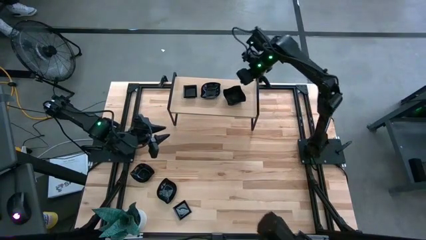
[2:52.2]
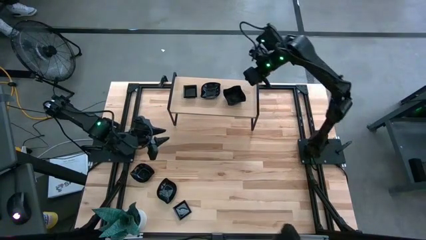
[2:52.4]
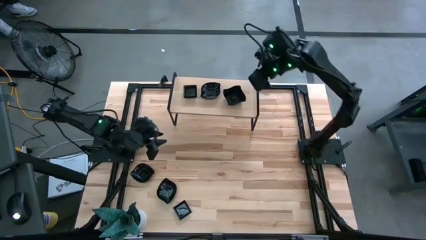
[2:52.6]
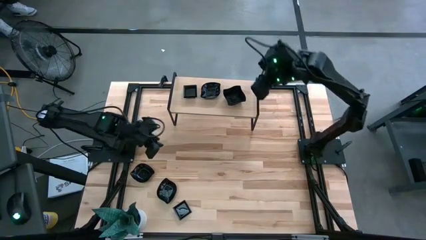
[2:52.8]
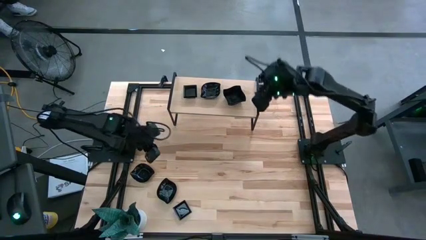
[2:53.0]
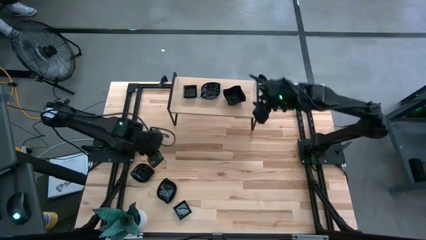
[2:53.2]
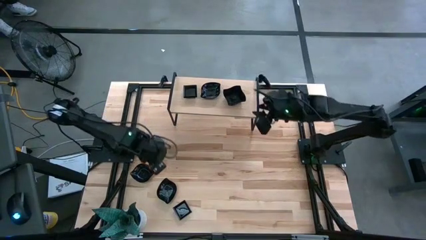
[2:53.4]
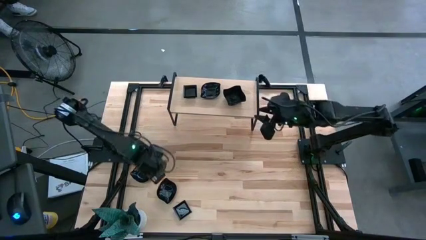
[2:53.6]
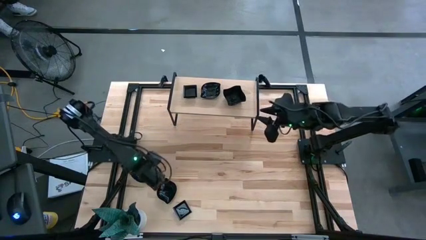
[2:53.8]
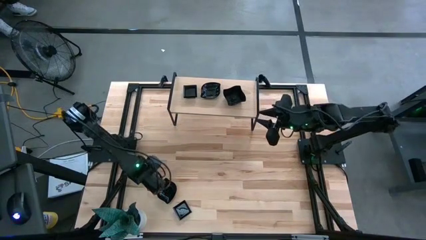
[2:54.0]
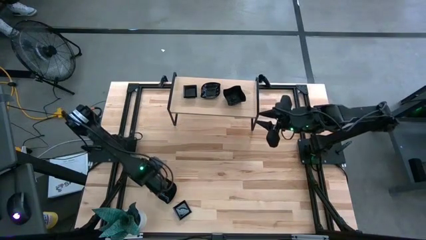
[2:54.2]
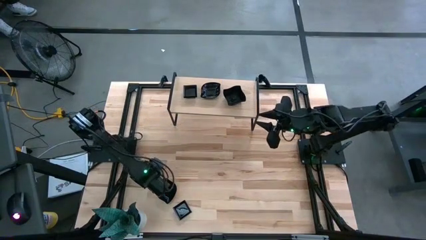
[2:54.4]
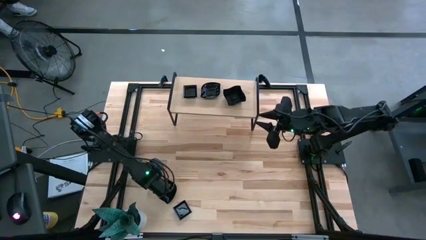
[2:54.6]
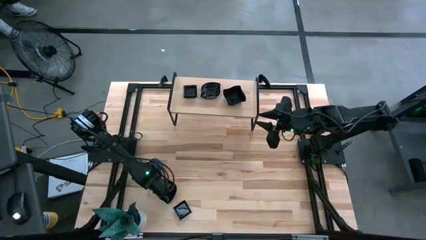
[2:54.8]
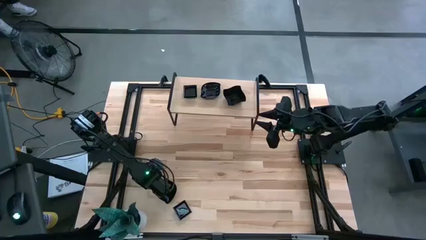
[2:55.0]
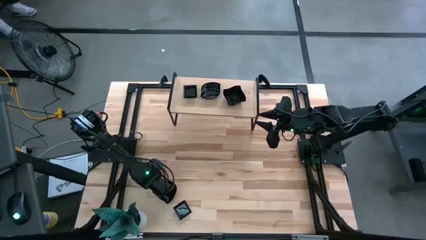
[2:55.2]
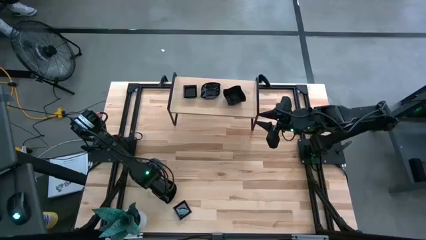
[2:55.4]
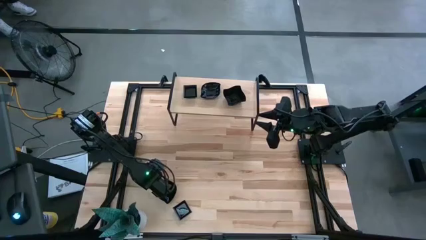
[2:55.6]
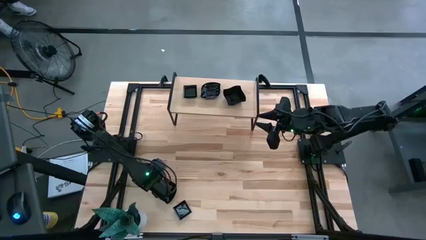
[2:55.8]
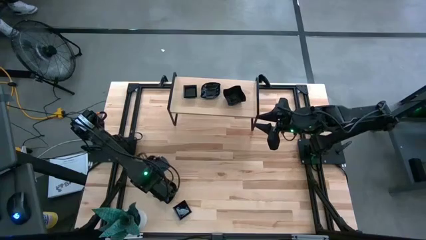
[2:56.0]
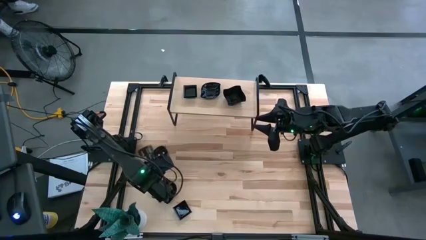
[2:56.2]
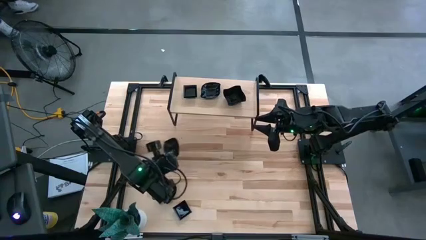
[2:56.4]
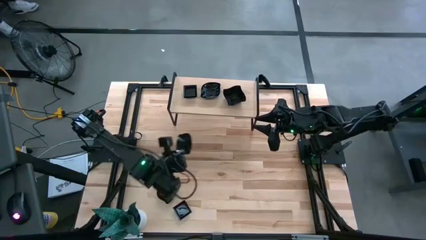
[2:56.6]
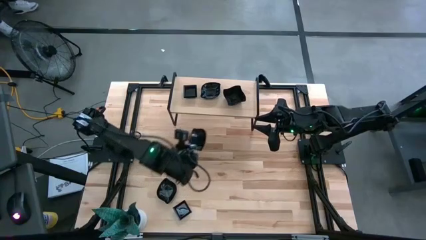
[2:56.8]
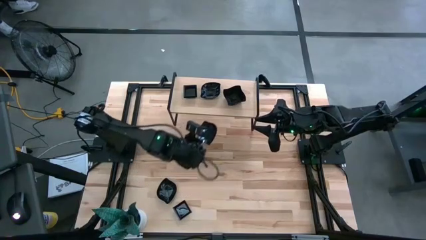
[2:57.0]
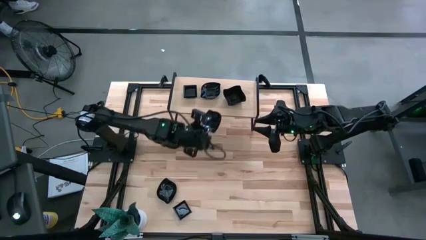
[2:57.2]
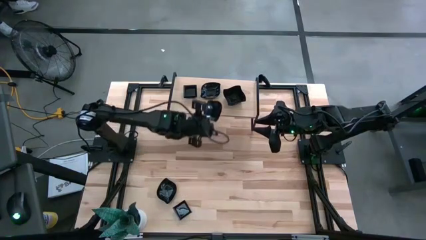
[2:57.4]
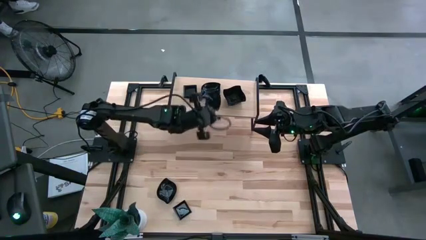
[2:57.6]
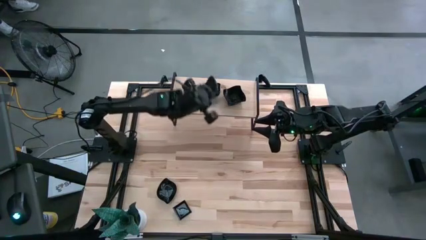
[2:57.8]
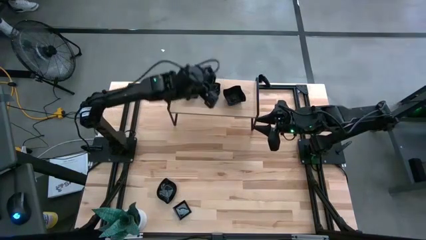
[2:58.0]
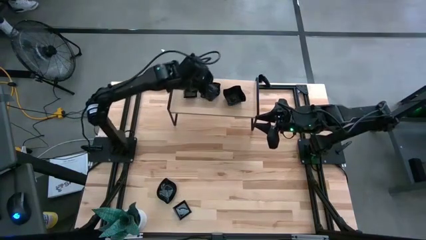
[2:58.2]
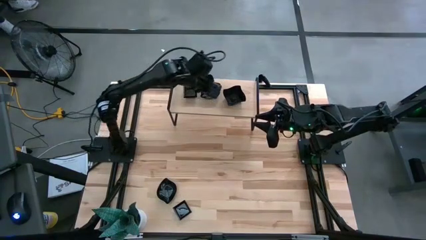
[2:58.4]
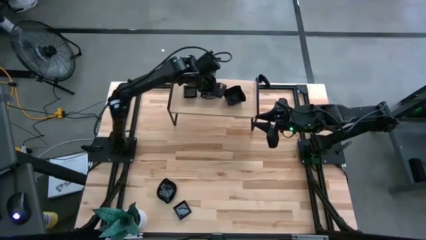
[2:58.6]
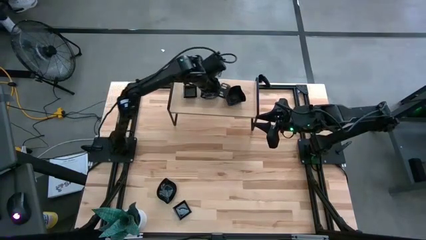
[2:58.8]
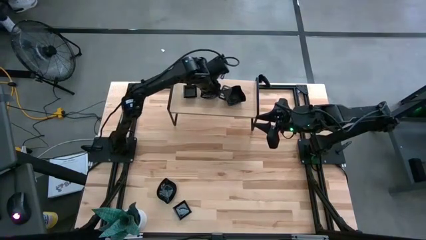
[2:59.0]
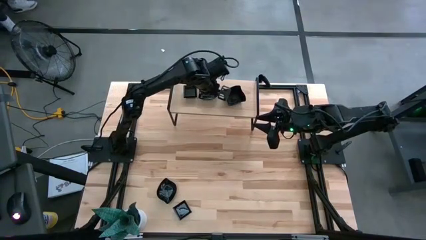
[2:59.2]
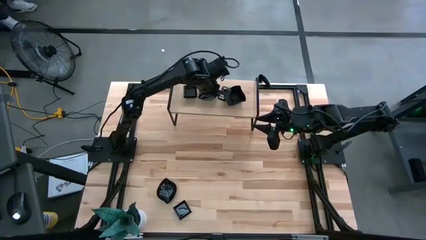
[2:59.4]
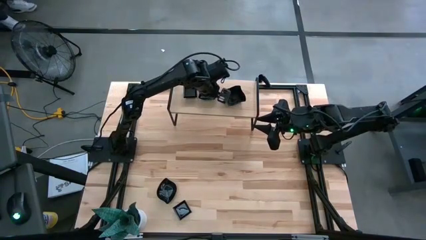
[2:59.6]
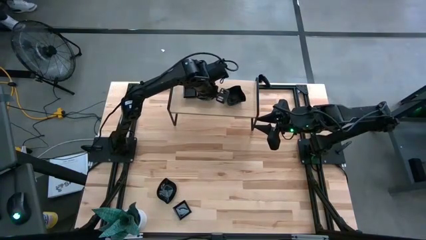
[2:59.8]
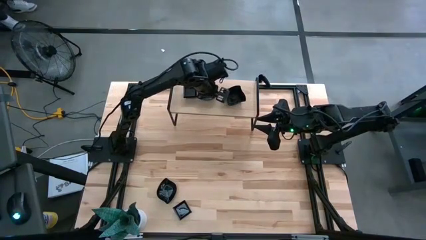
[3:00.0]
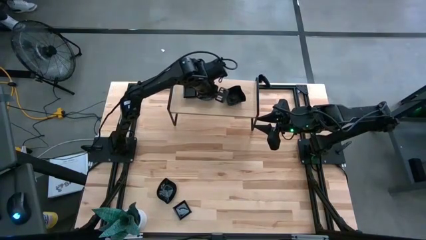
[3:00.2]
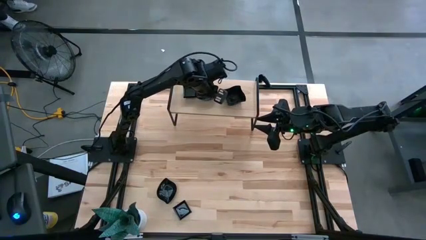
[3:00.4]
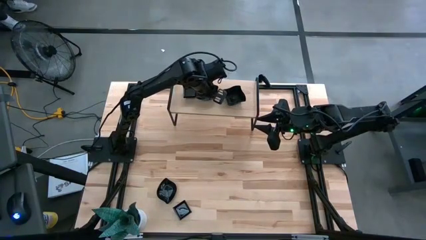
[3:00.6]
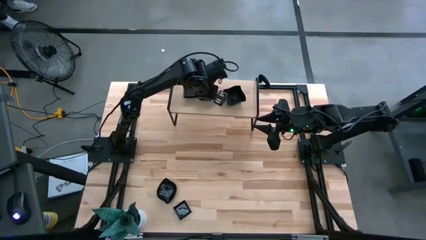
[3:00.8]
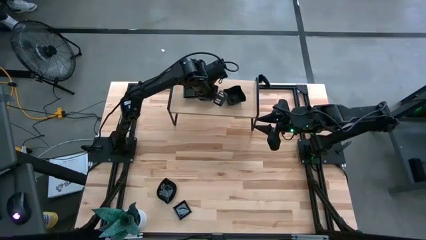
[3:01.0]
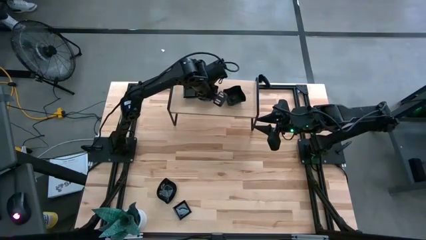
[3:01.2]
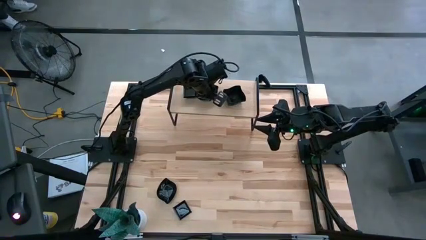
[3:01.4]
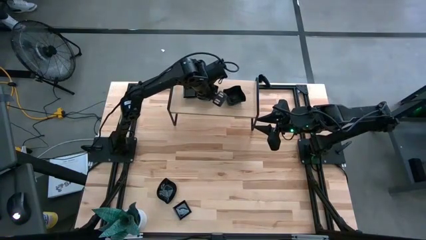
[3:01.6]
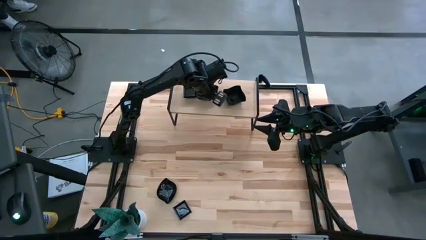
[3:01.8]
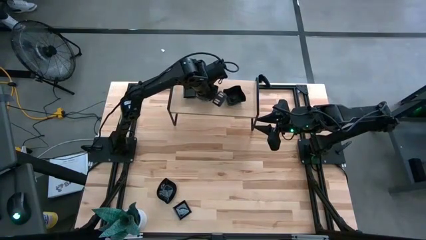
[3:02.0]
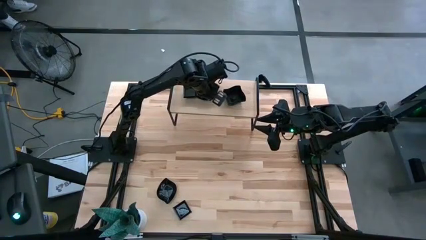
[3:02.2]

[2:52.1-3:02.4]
Task: Pick & Place Mini shaped plates
Stack the leaf-shaped plate on the leaf-shaped plate
